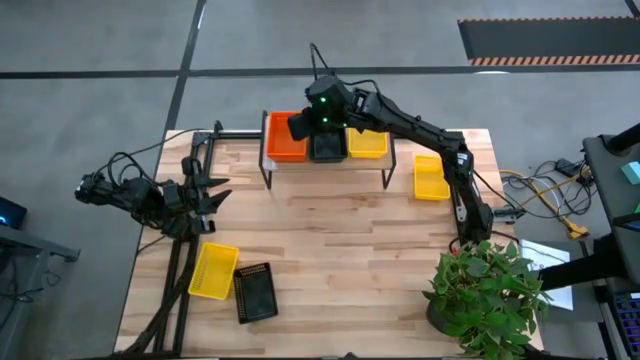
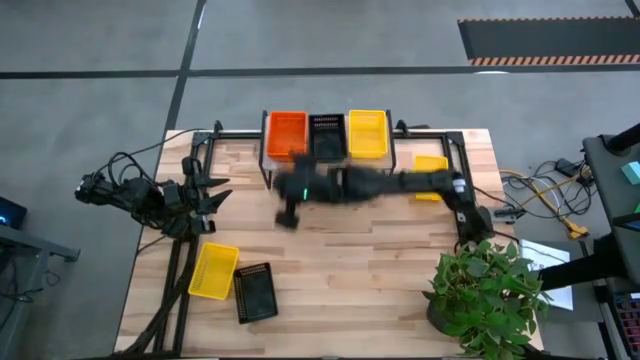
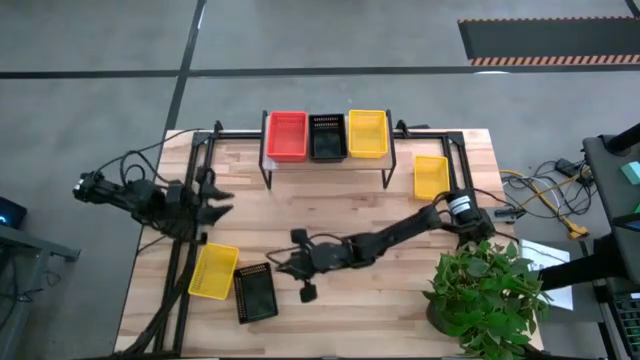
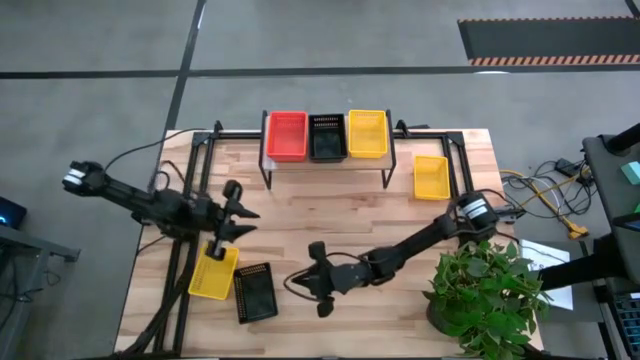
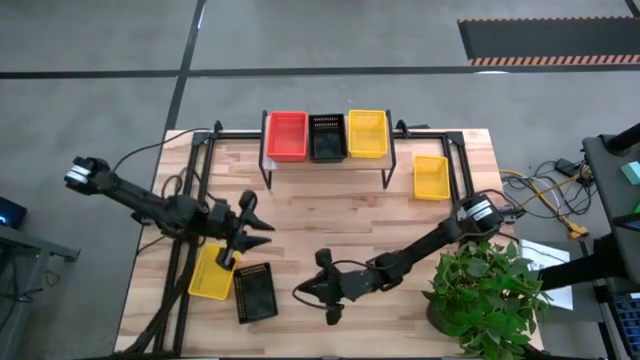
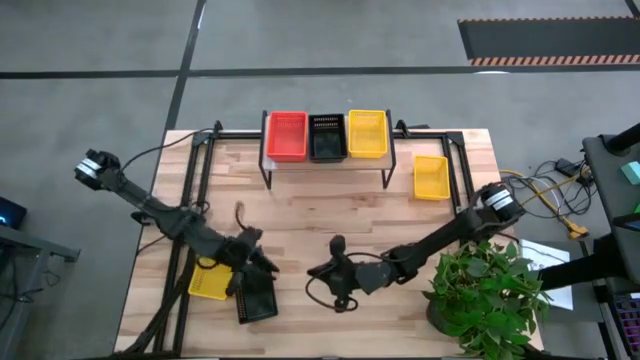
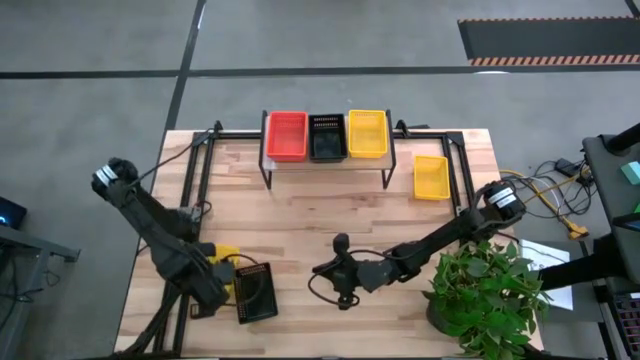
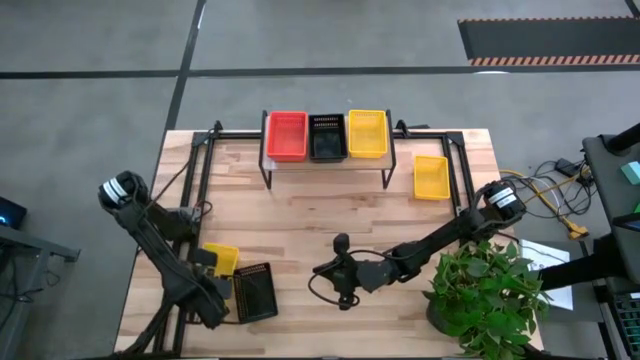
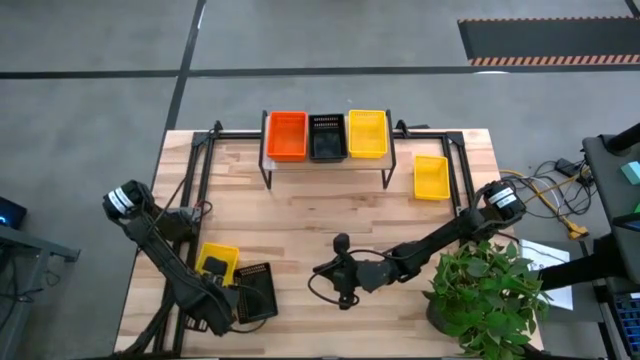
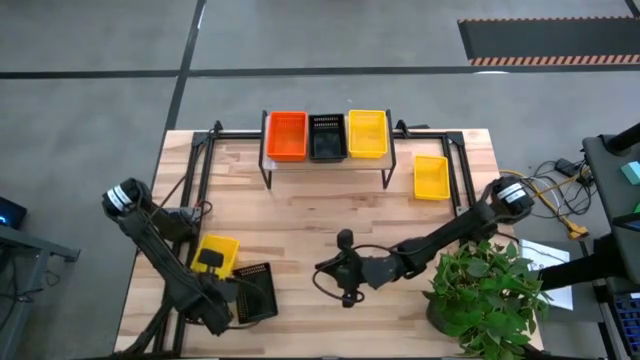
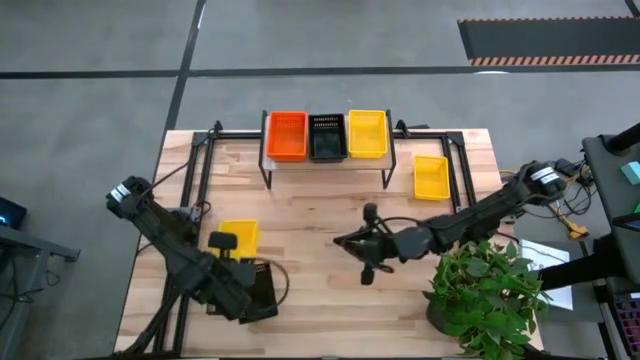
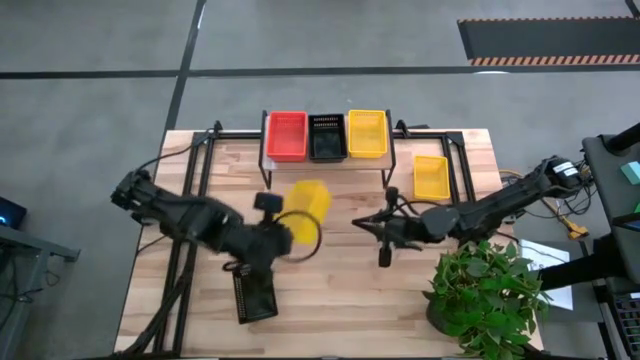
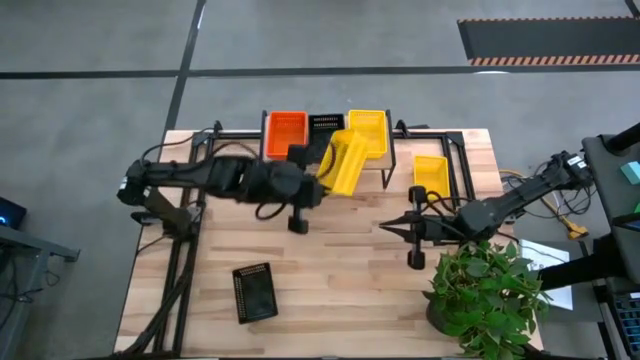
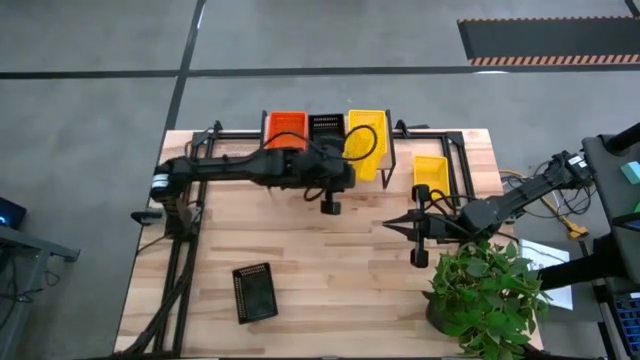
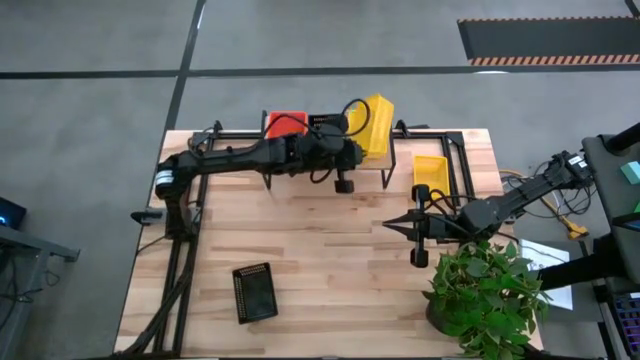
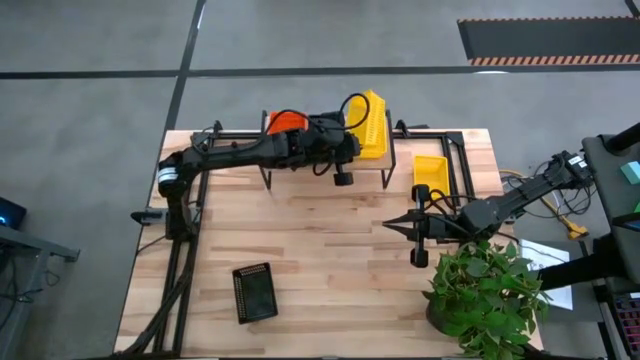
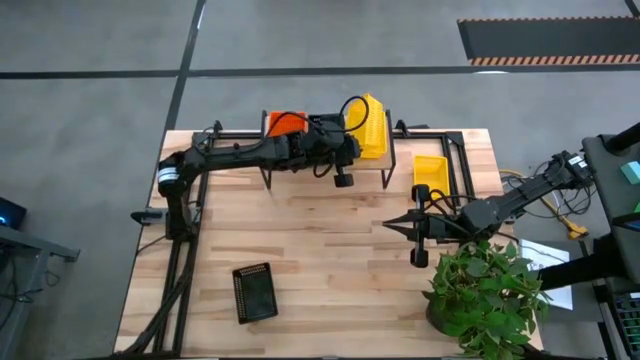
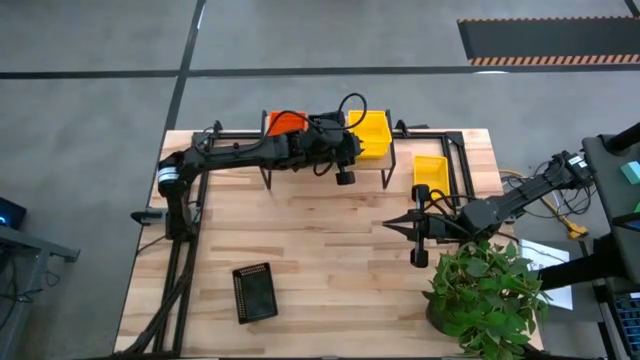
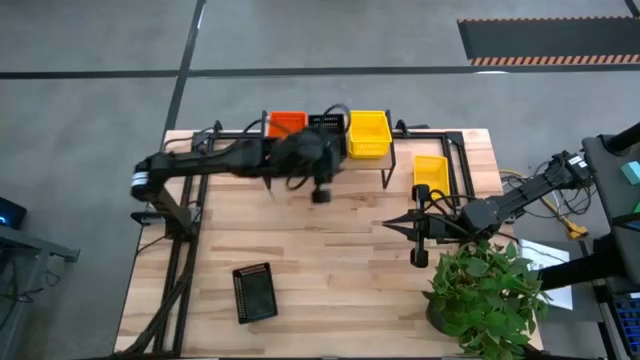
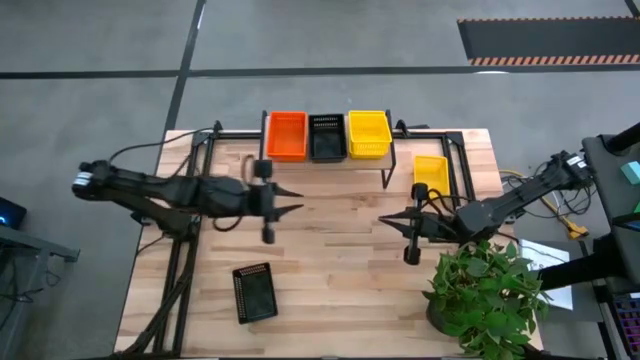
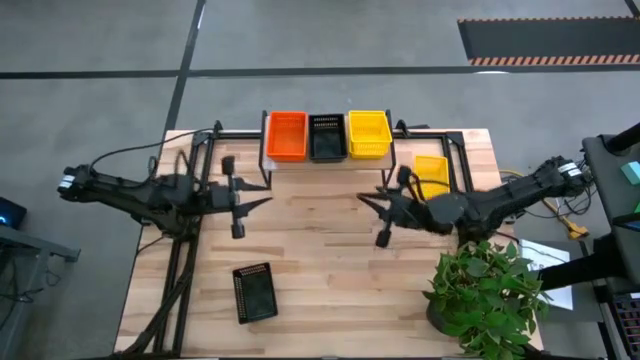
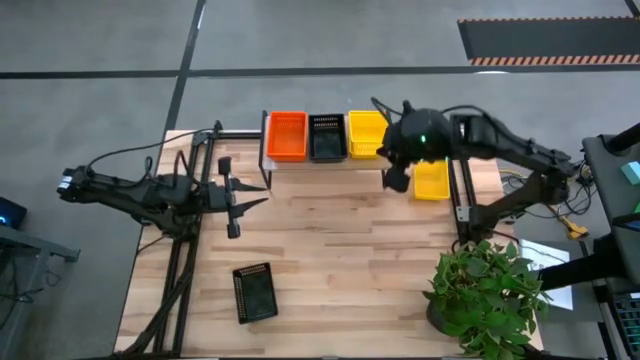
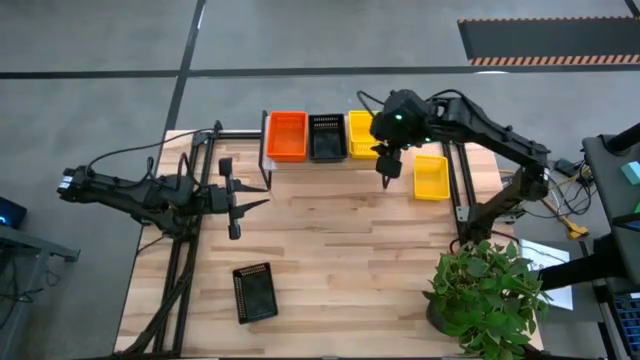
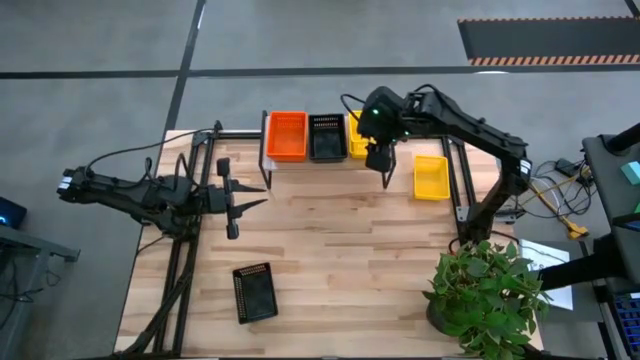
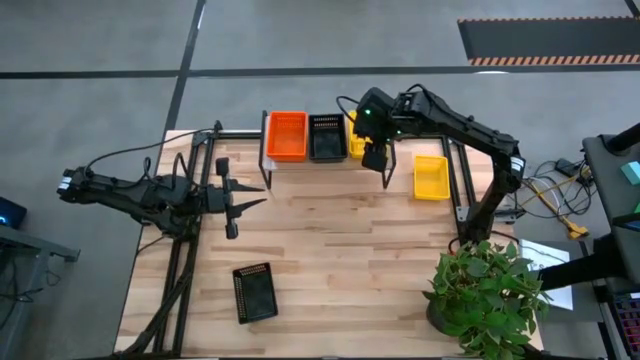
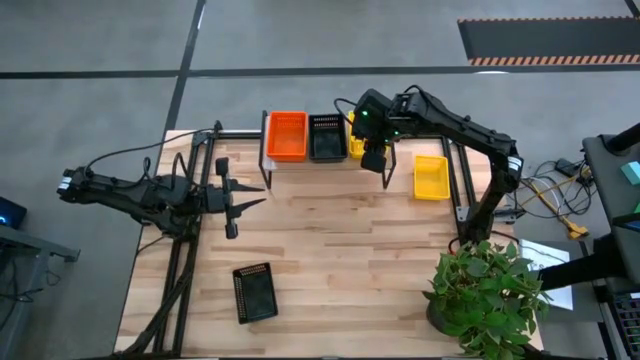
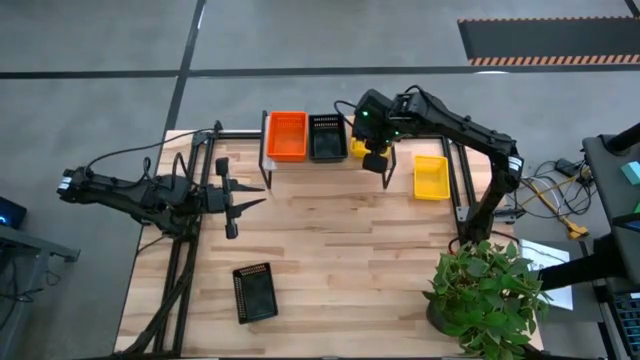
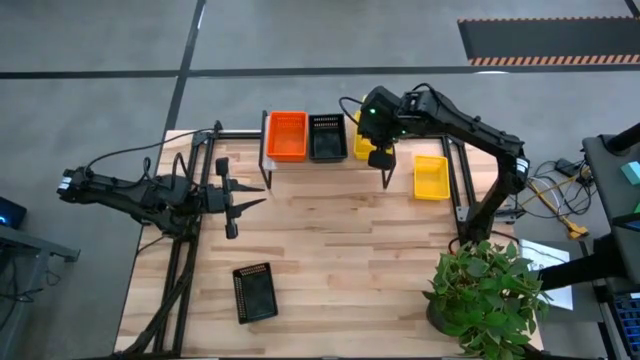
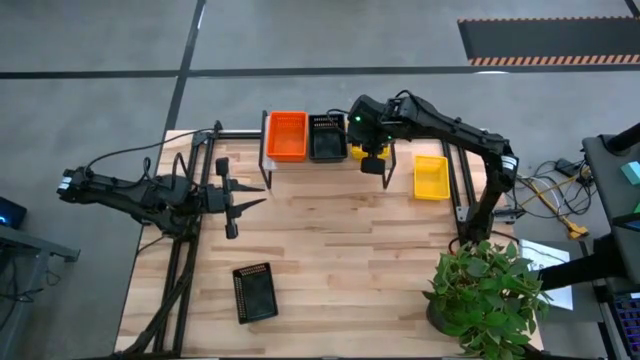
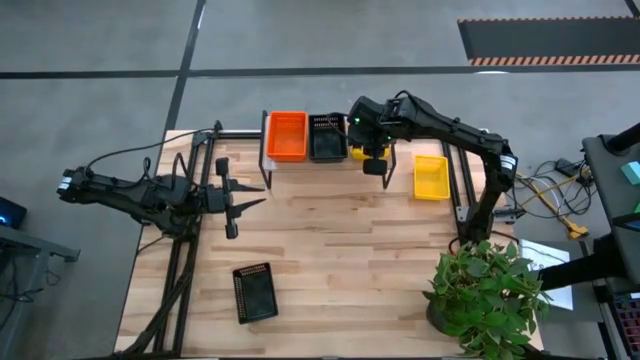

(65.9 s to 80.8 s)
Stack the bottom yellow basket into the yellow basket on the shelf

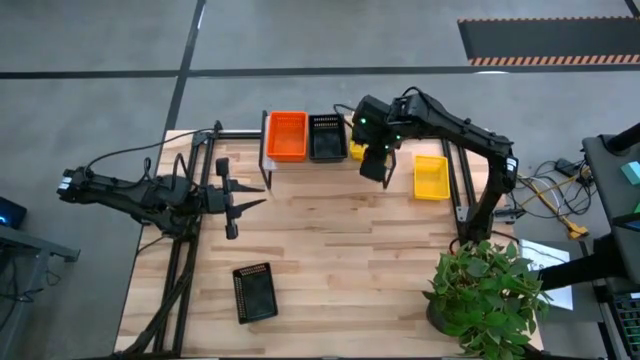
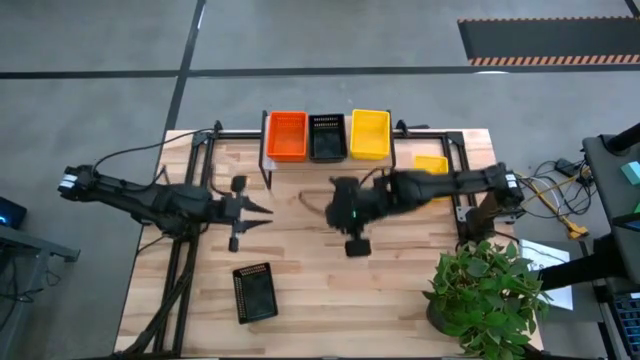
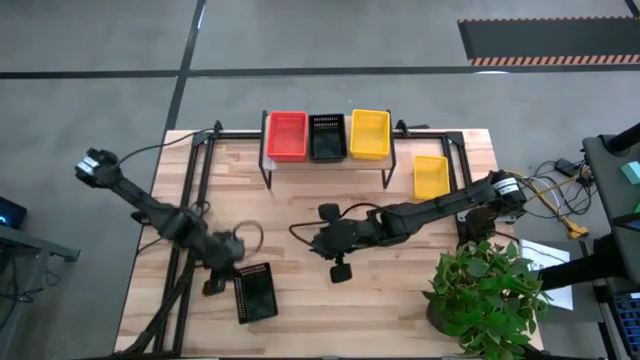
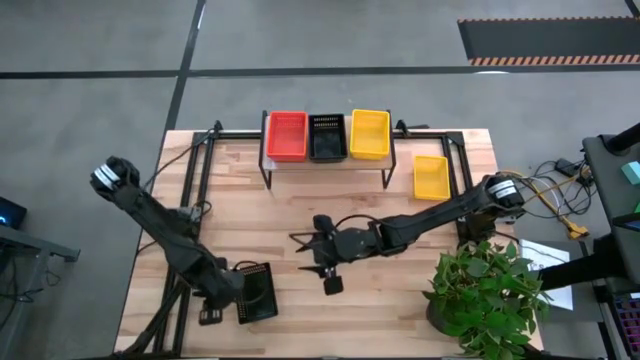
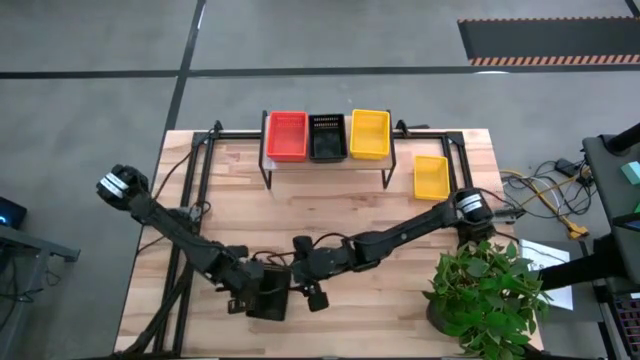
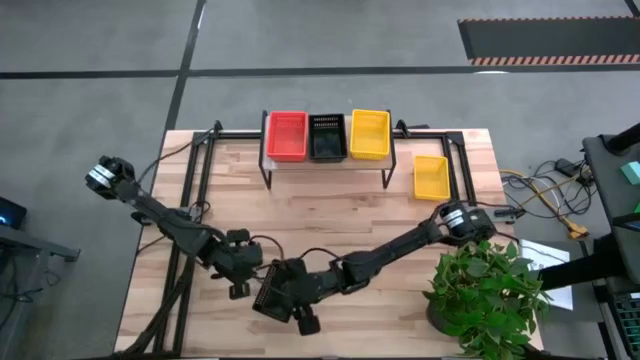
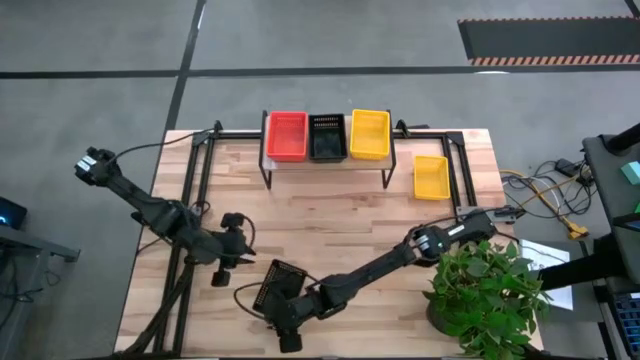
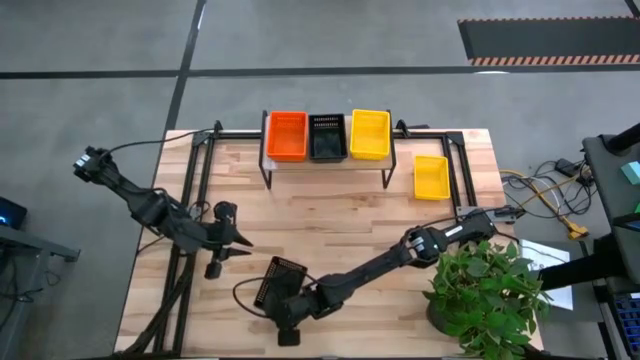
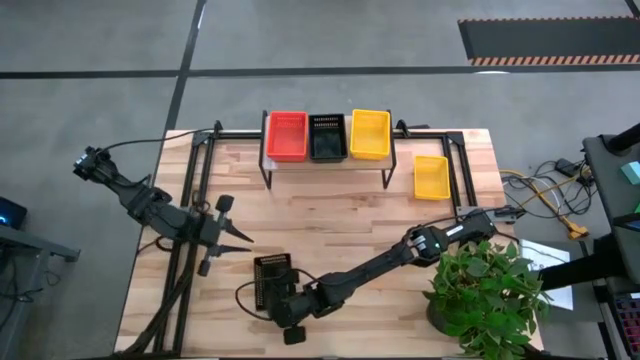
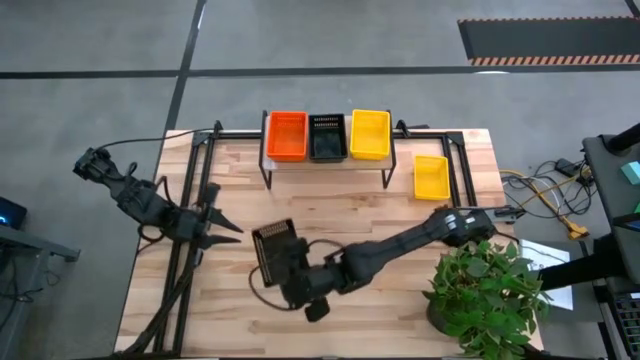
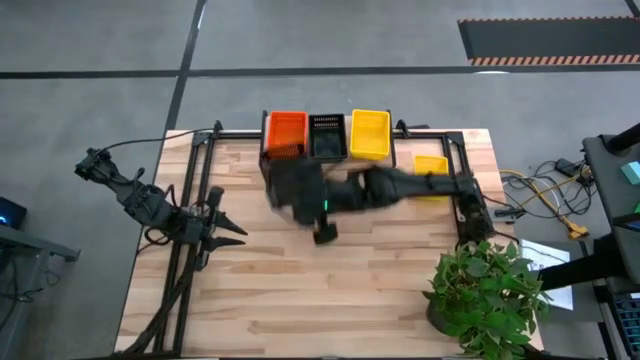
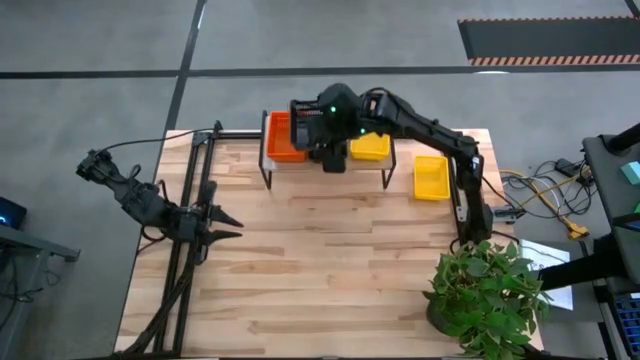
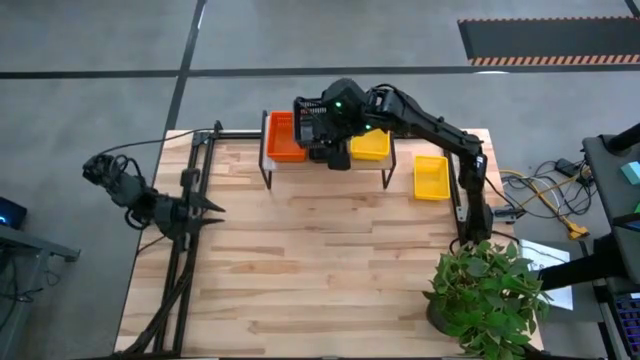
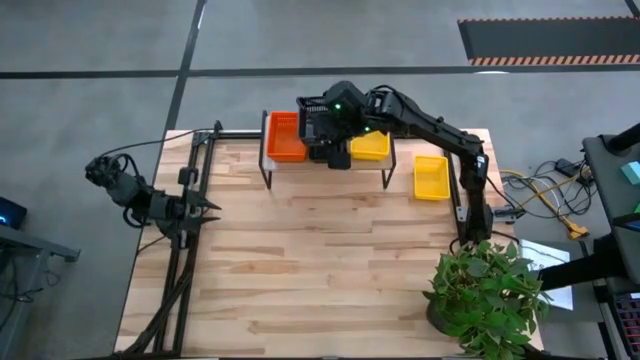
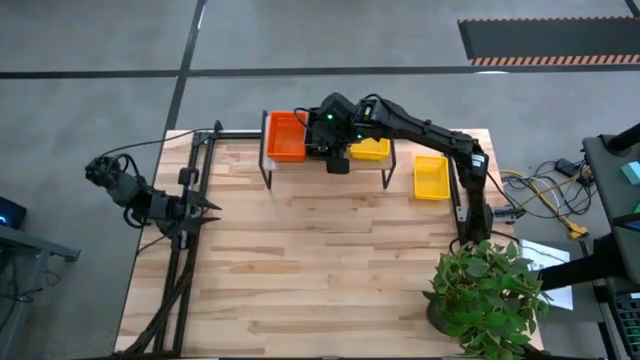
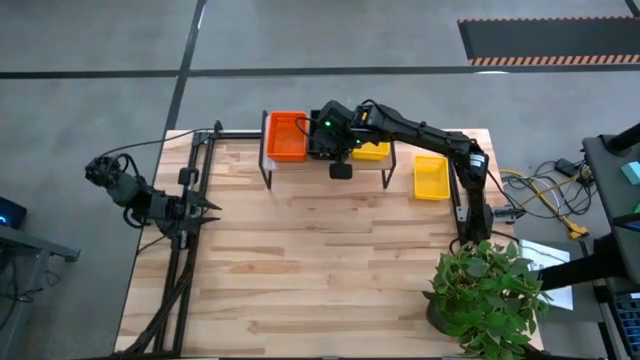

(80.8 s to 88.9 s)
Stack the black basket into the stacked black basket on the shelf
